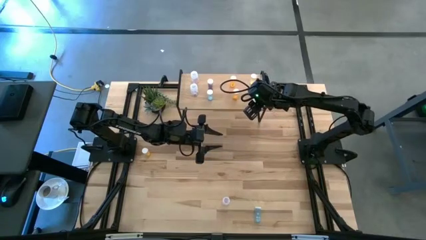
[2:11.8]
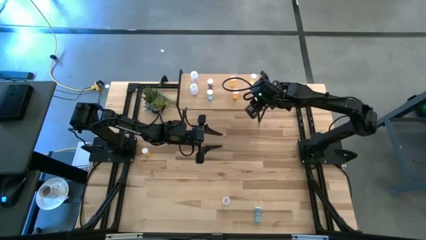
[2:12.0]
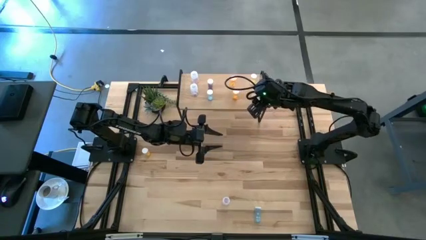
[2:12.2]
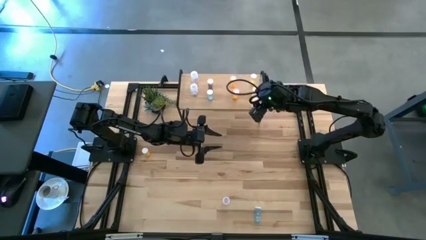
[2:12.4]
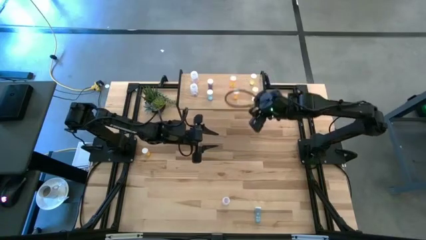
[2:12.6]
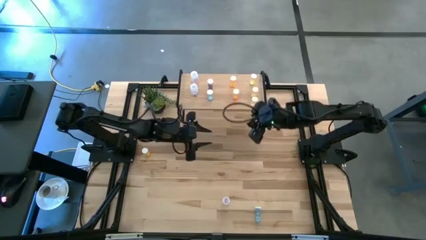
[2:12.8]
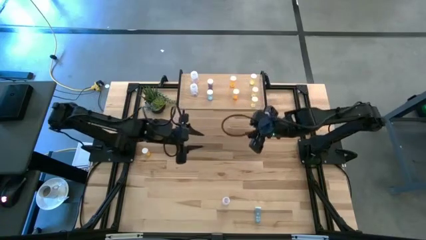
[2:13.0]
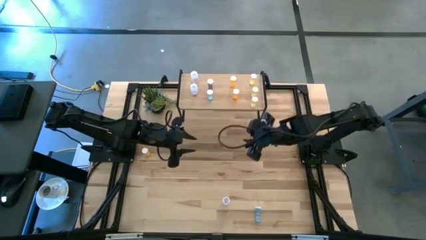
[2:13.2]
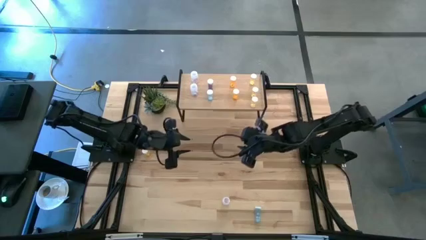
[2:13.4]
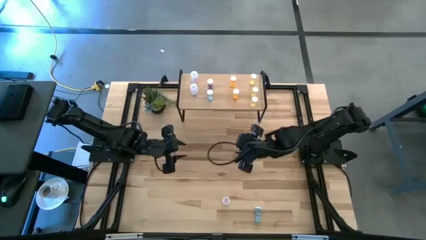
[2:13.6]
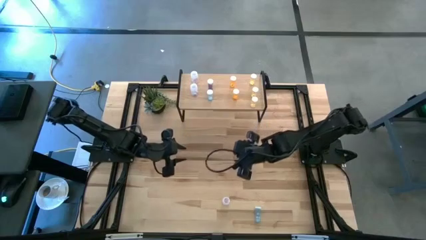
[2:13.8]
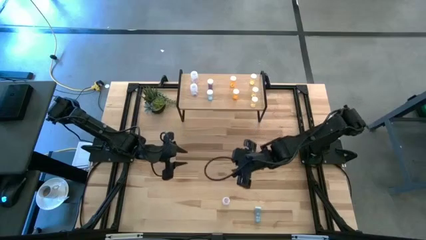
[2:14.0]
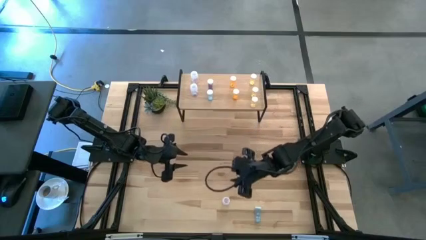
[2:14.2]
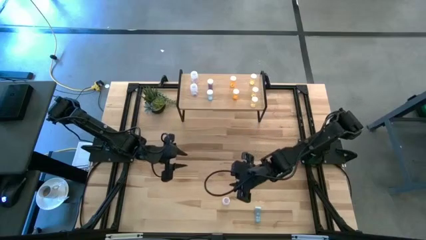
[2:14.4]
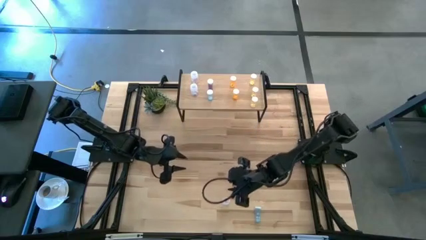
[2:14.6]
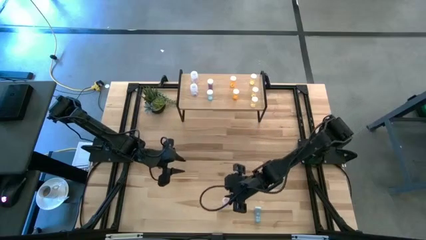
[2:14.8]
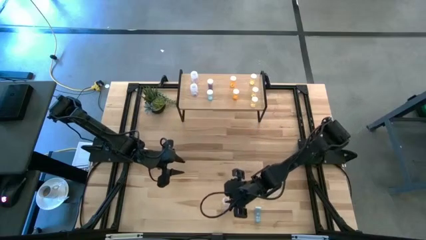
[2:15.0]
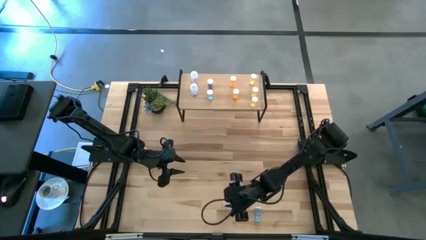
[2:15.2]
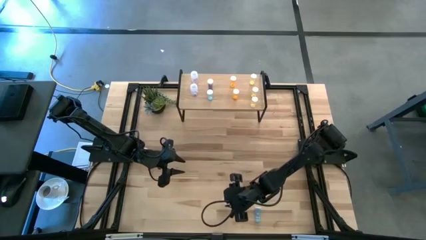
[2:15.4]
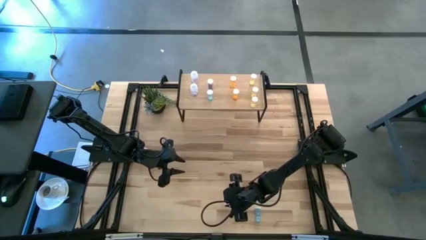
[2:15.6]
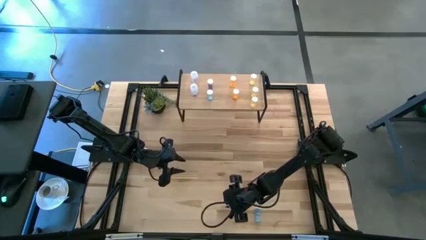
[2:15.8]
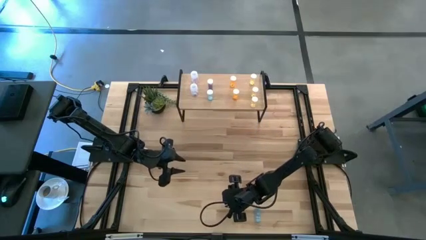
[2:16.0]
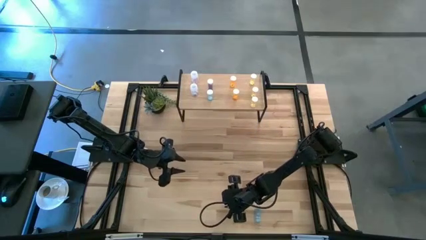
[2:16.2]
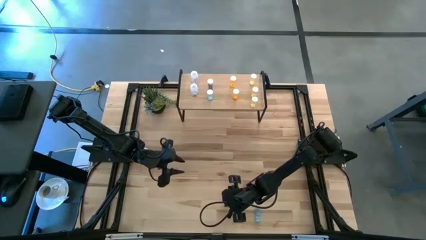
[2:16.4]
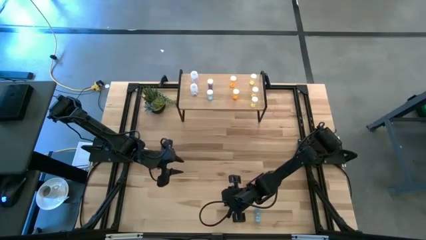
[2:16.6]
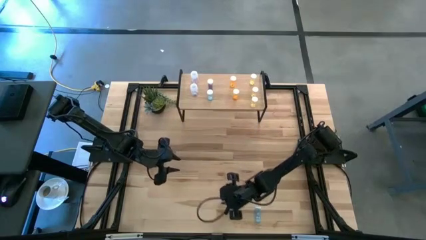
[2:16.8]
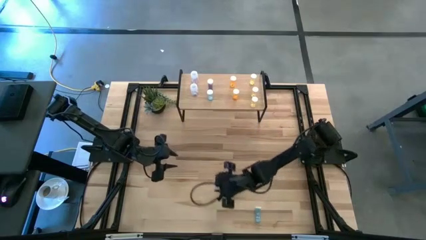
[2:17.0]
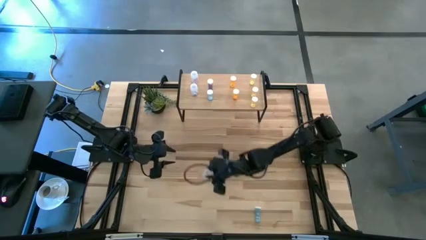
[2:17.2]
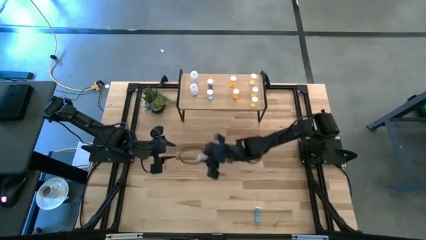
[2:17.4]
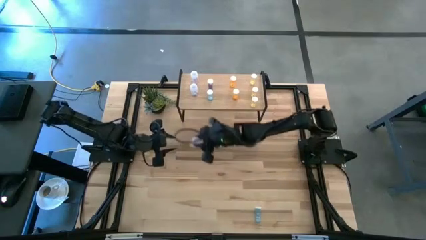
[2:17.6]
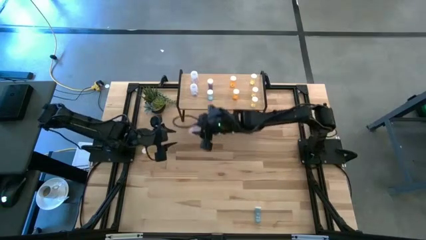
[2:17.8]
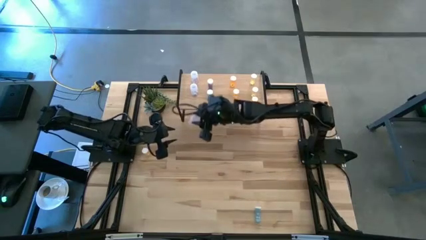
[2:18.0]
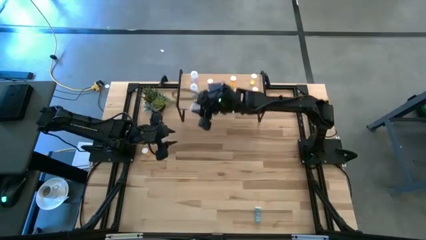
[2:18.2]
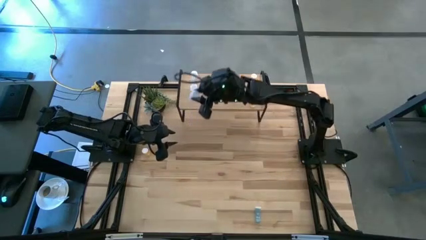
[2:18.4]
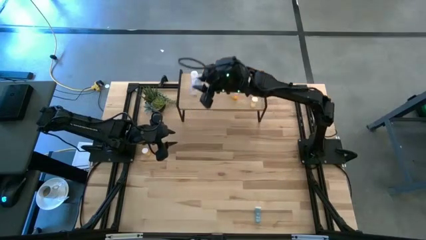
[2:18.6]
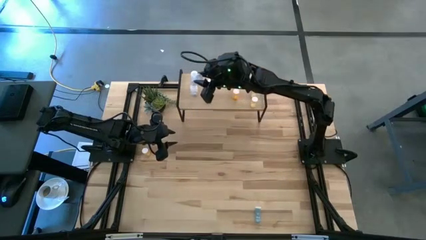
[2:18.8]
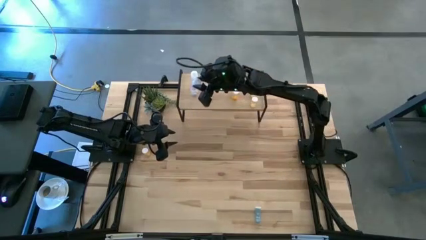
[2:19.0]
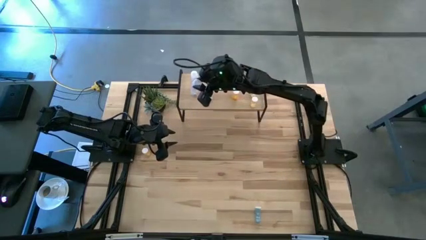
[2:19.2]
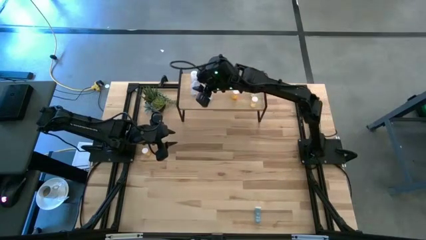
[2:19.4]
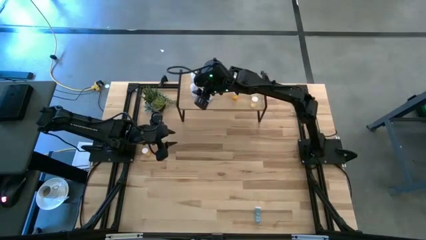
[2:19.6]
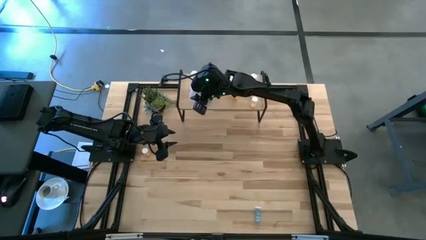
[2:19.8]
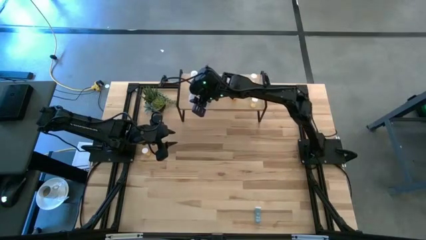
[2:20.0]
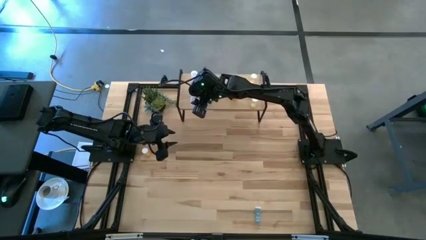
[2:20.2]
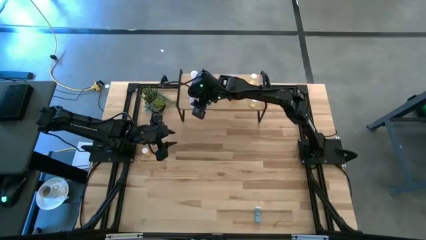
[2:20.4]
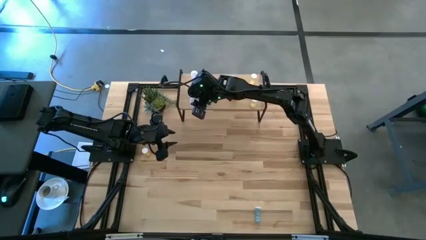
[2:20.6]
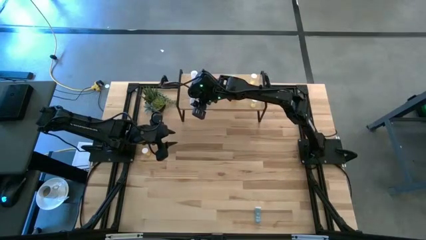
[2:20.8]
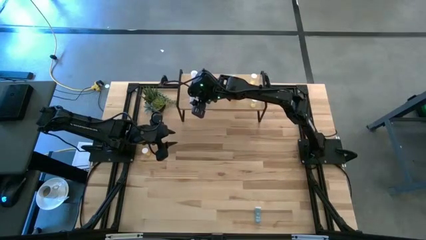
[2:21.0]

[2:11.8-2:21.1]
Task: Pick and place medicine bottles onto shelf by color
Put the transparent pill bottle on the shelf aligned with the transparent pill bottles

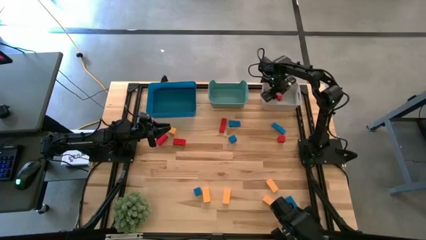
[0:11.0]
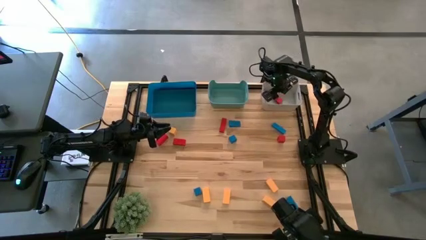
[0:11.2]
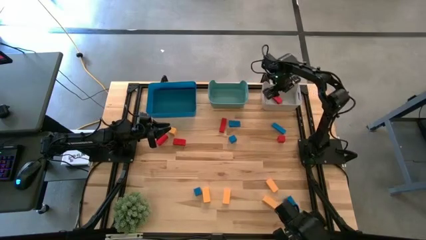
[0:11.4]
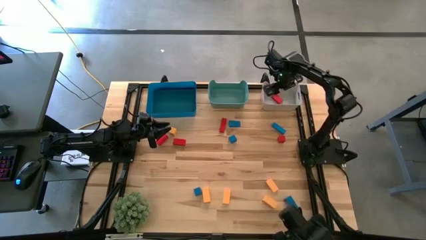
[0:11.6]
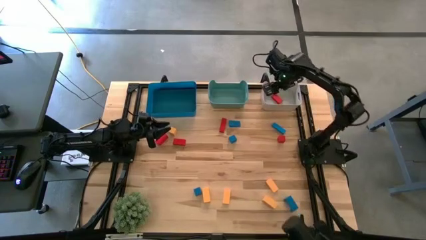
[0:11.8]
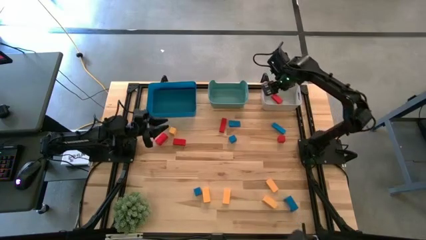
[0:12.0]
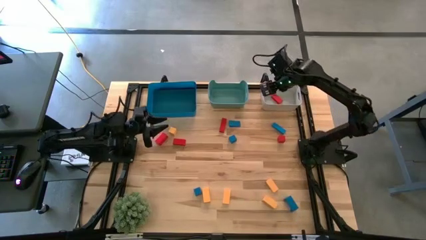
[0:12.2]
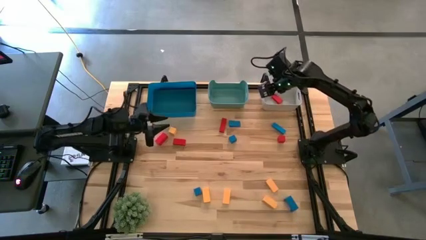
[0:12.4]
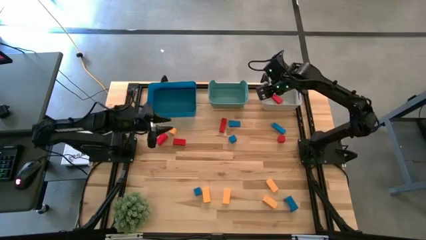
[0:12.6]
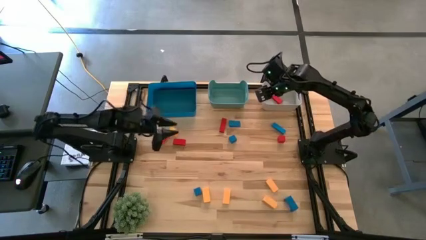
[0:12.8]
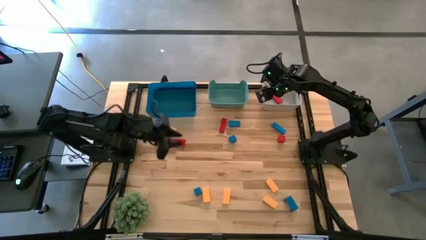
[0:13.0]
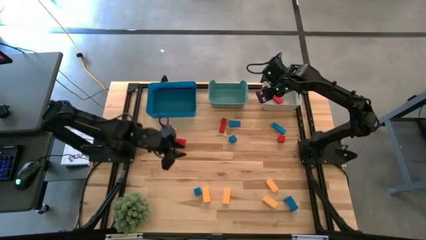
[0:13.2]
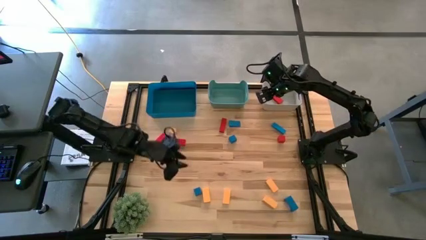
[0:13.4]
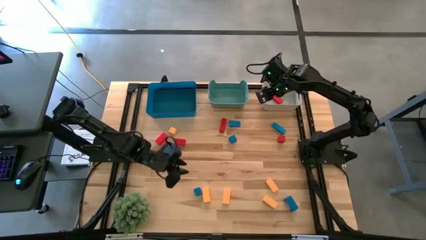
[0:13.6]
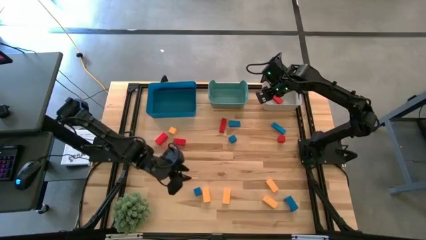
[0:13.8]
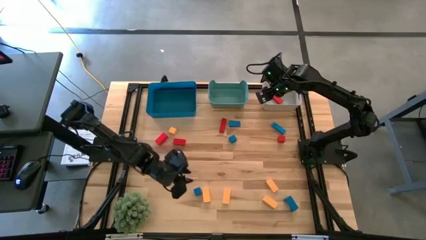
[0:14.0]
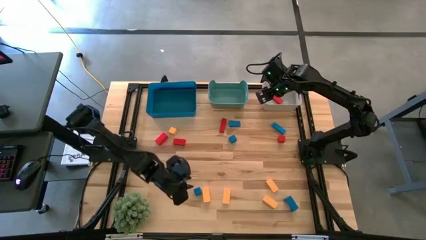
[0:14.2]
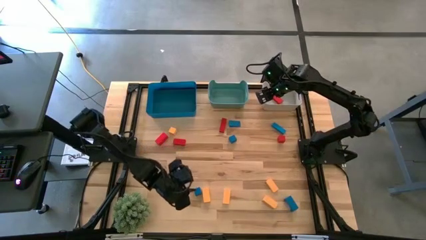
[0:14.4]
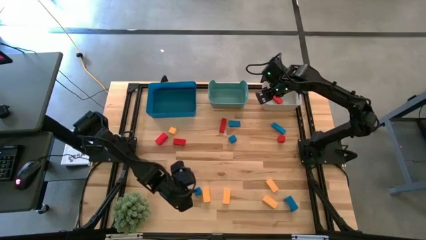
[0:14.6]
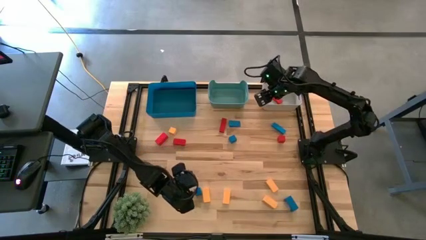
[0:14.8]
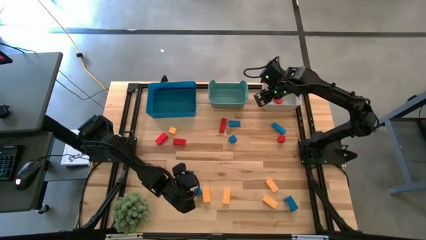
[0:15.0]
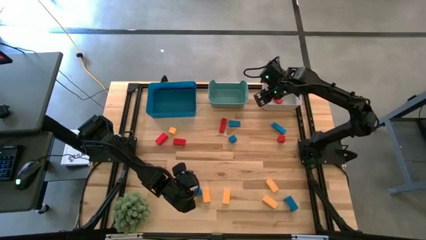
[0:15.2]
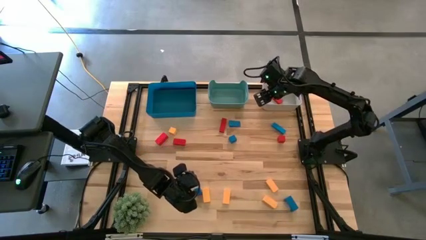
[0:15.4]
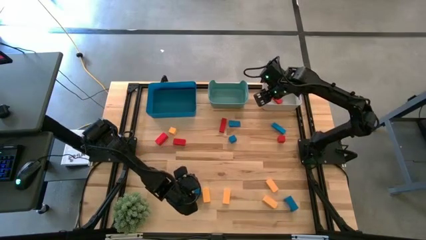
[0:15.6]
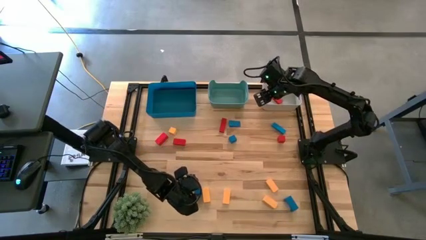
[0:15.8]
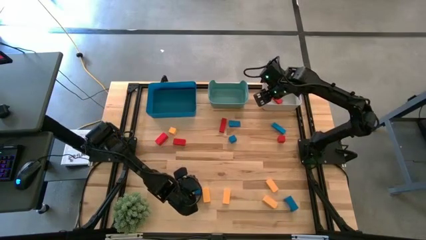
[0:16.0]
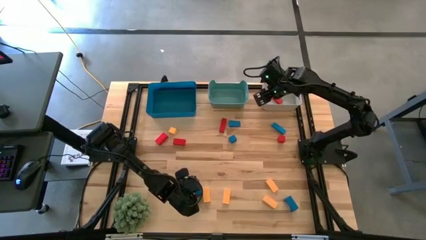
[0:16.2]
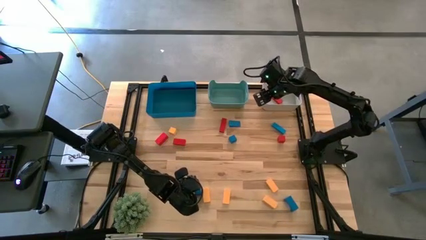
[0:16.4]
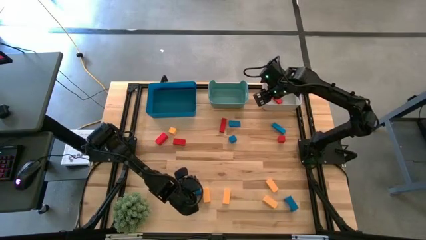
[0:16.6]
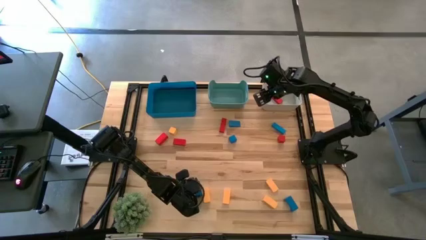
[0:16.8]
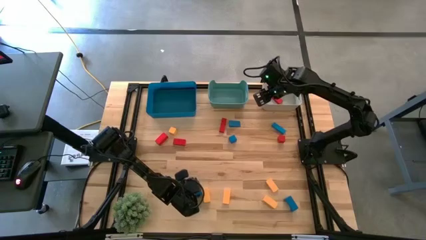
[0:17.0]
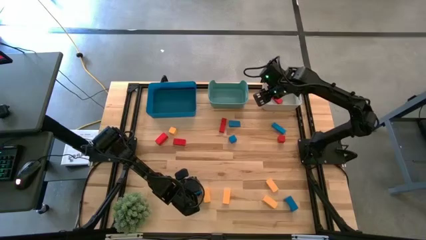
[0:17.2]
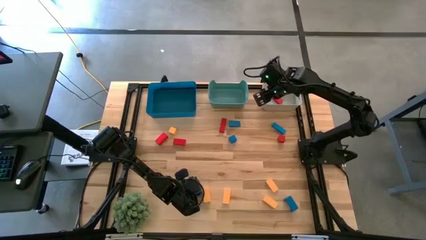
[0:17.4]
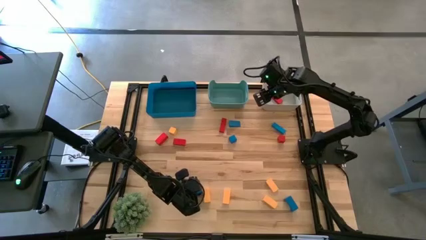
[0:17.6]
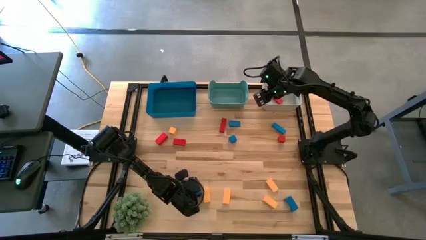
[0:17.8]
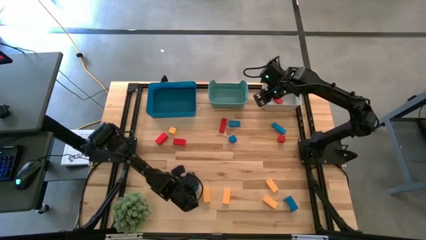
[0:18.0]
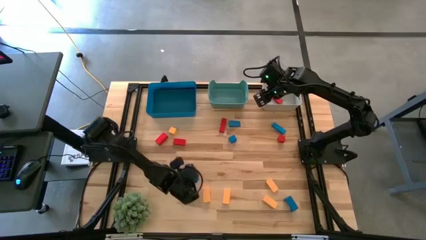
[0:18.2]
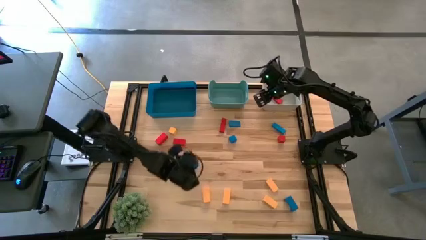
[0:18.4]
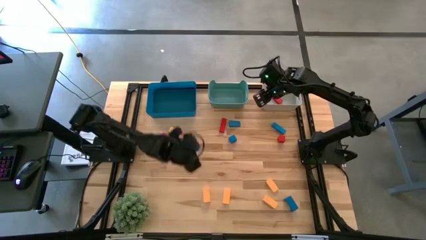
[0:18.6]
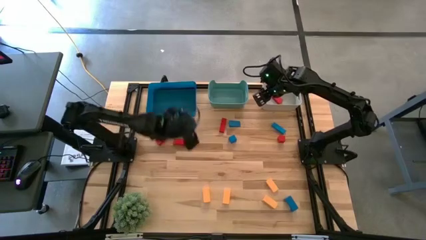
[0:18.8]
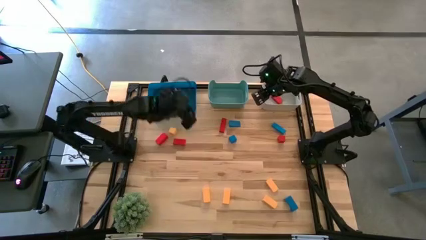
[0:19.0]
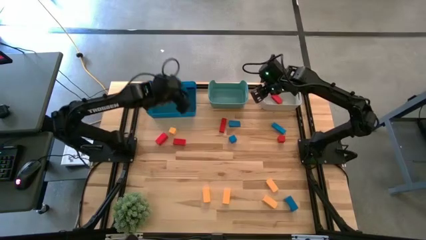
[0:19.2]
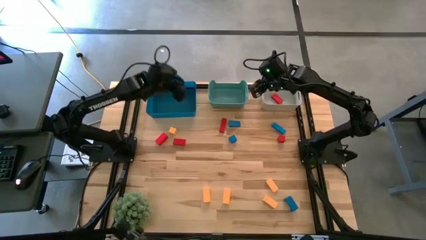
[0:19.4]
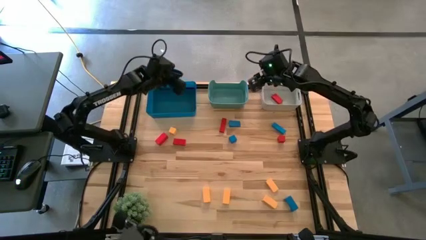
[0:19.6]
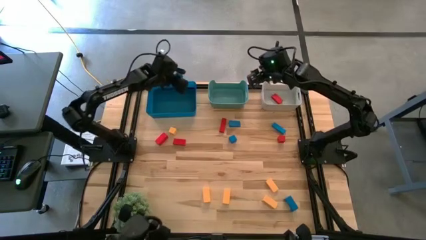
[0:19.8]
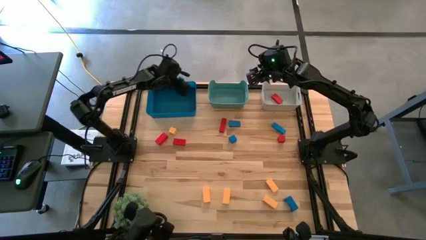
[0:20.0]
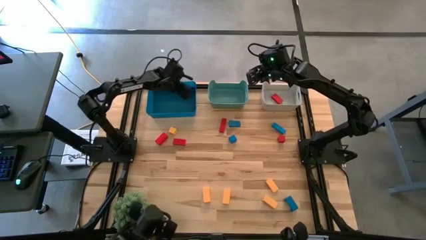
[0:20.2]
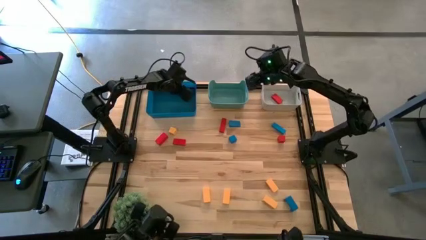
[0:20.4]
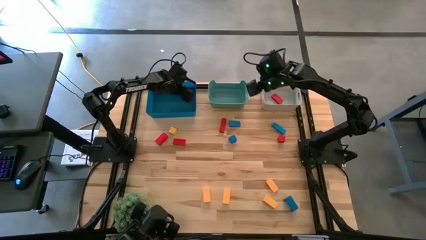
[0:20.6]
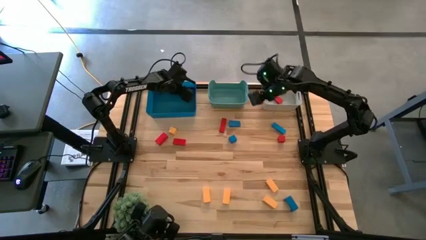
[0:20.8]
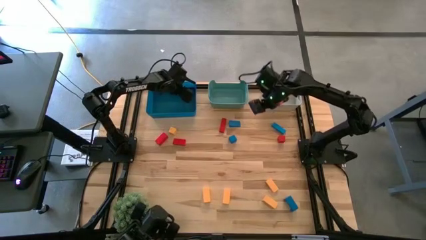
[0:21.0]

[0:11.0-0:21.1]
Task: Sort & place blocks by color
Put the blue block into the blue bin
